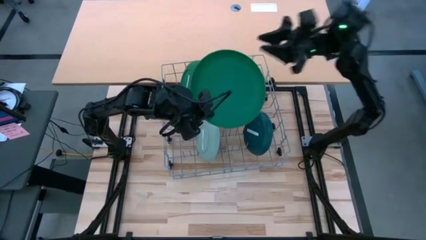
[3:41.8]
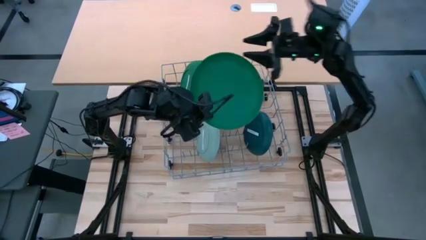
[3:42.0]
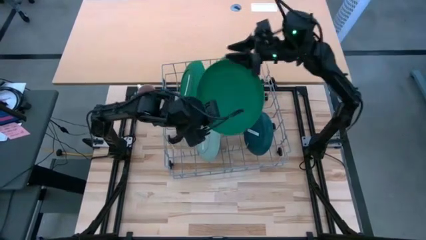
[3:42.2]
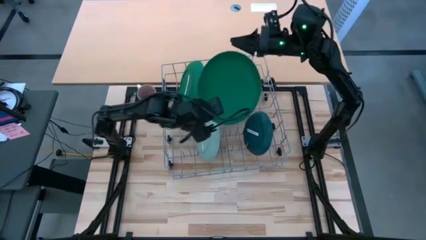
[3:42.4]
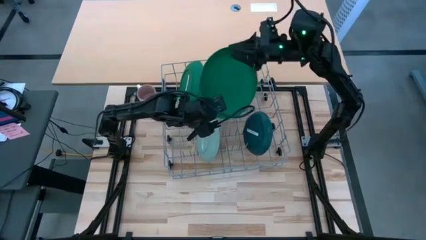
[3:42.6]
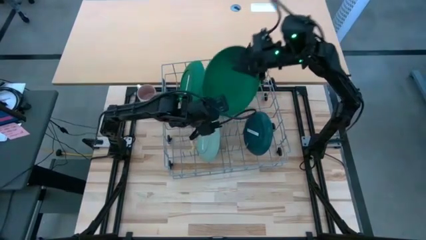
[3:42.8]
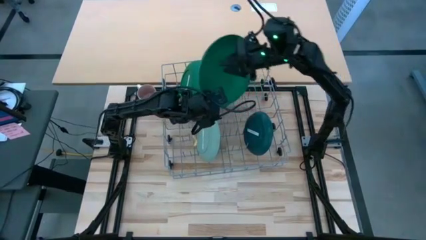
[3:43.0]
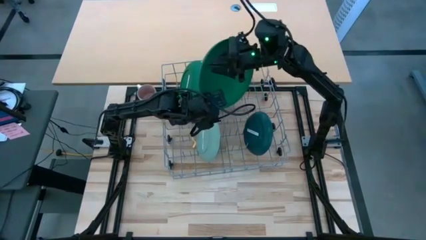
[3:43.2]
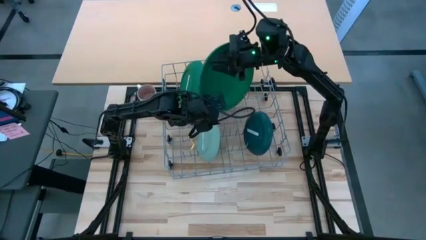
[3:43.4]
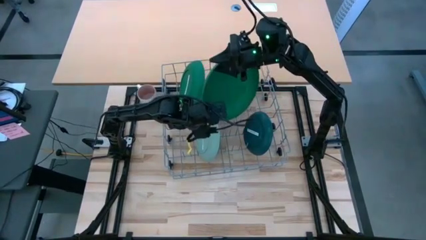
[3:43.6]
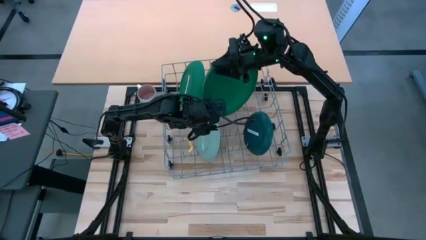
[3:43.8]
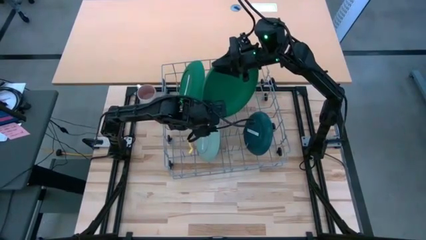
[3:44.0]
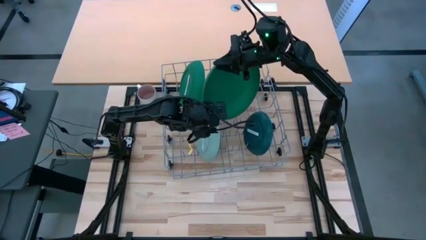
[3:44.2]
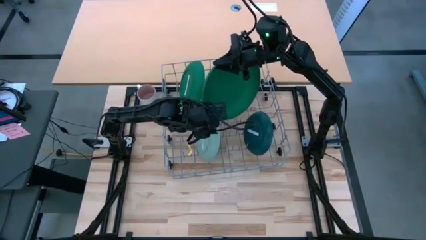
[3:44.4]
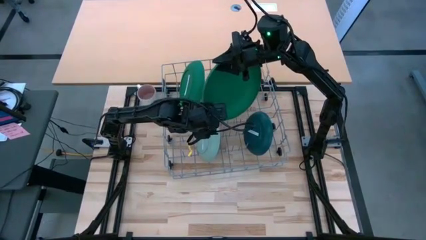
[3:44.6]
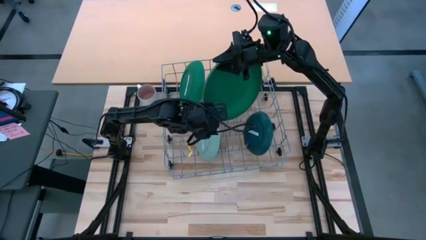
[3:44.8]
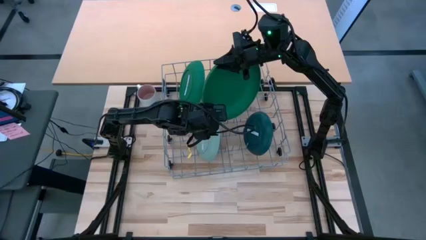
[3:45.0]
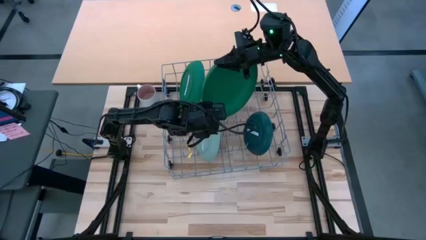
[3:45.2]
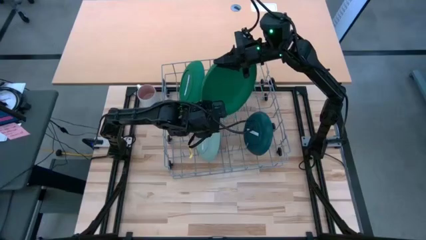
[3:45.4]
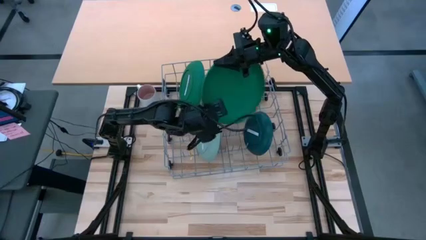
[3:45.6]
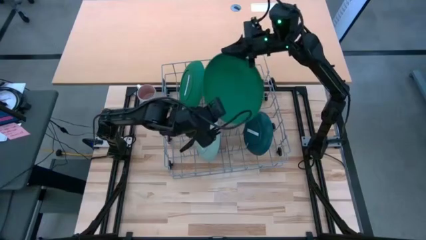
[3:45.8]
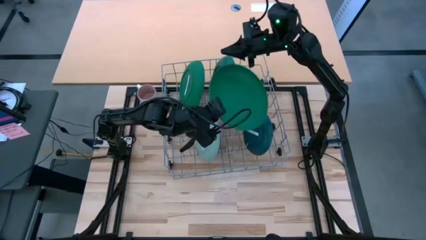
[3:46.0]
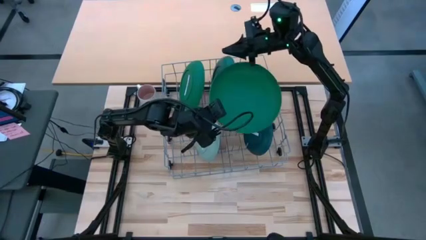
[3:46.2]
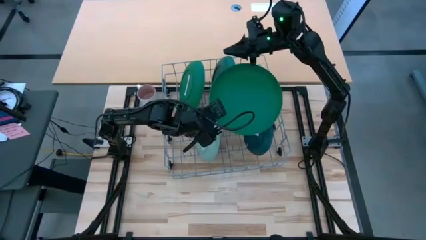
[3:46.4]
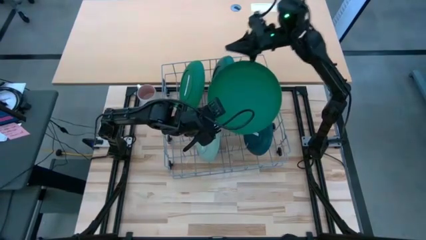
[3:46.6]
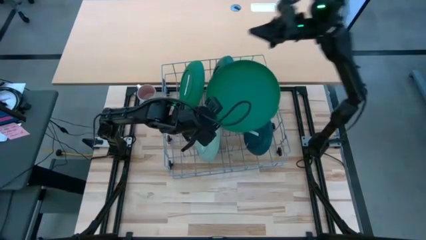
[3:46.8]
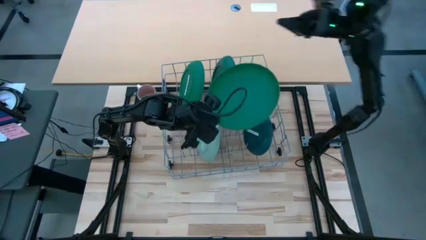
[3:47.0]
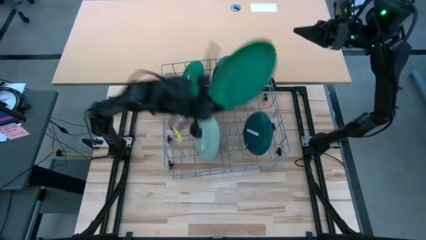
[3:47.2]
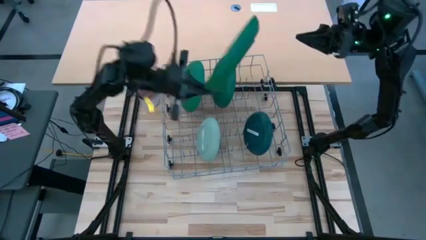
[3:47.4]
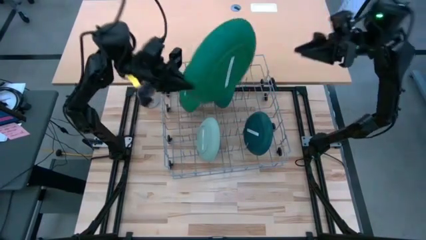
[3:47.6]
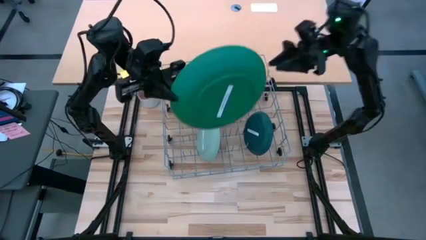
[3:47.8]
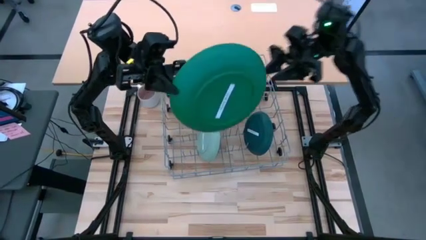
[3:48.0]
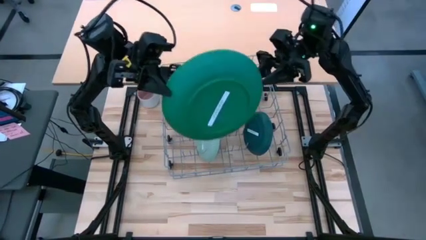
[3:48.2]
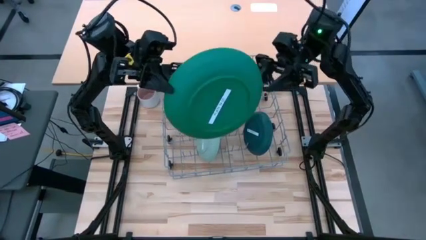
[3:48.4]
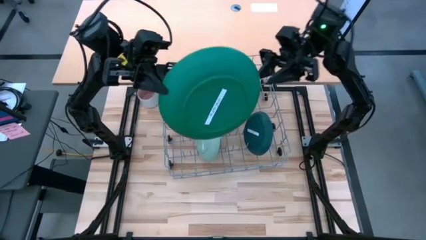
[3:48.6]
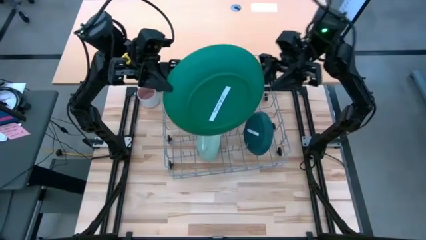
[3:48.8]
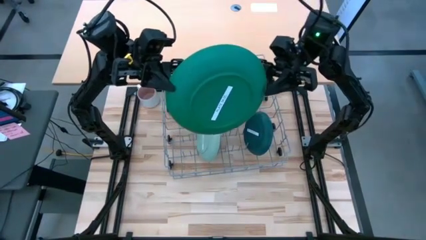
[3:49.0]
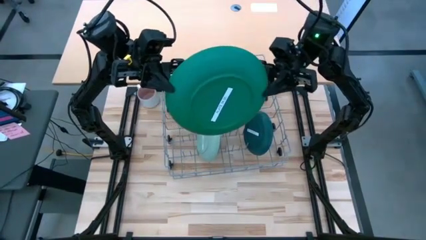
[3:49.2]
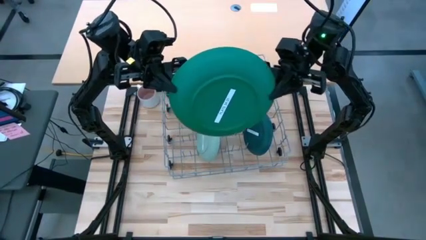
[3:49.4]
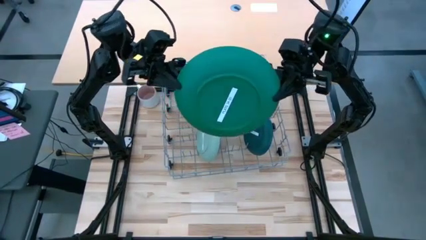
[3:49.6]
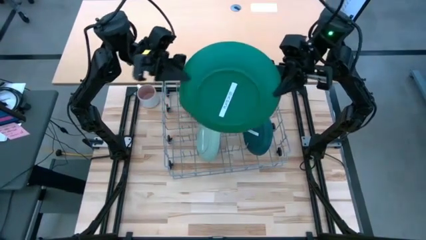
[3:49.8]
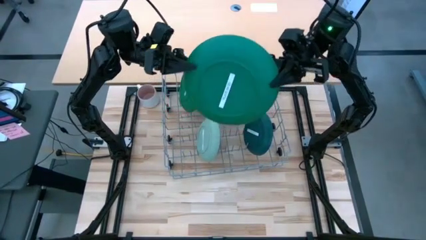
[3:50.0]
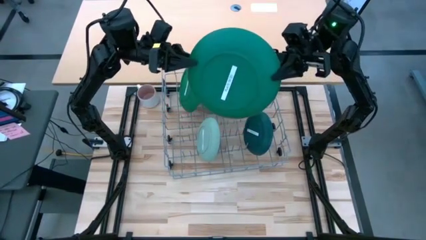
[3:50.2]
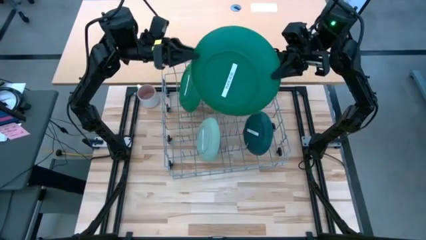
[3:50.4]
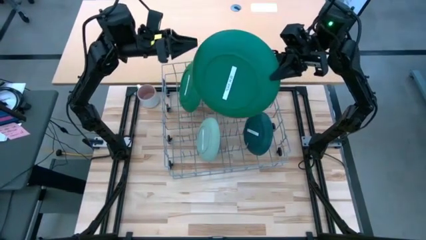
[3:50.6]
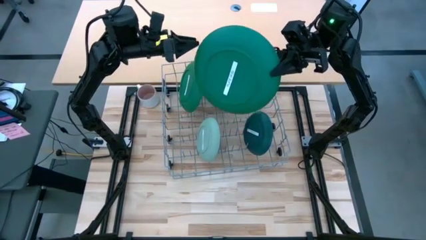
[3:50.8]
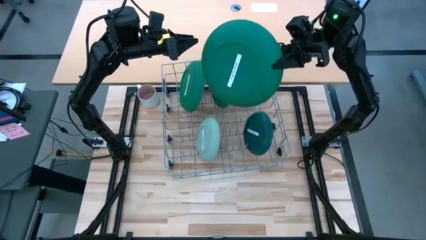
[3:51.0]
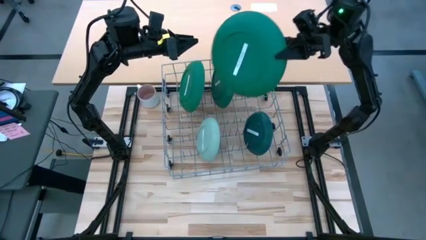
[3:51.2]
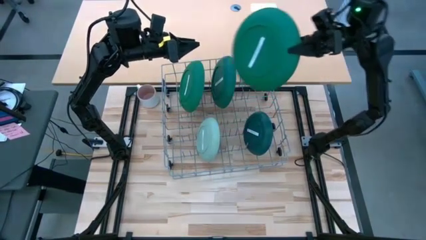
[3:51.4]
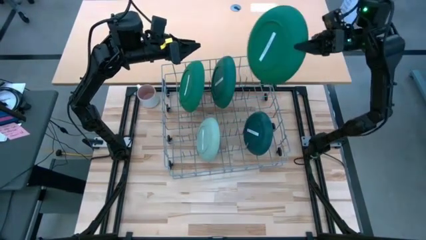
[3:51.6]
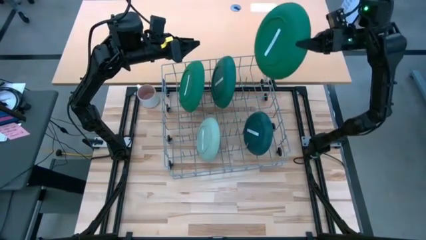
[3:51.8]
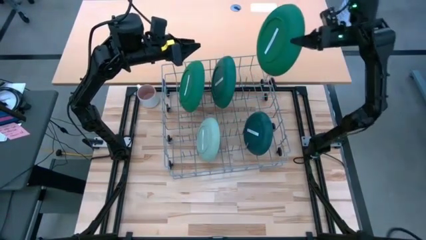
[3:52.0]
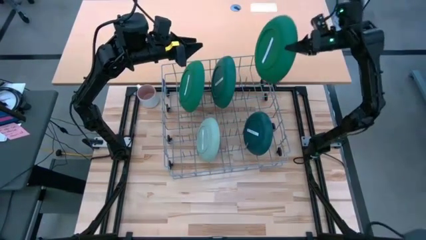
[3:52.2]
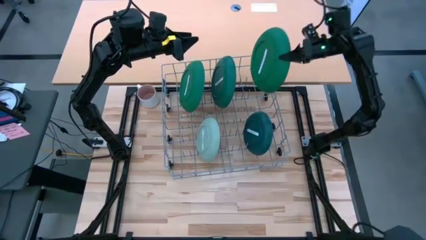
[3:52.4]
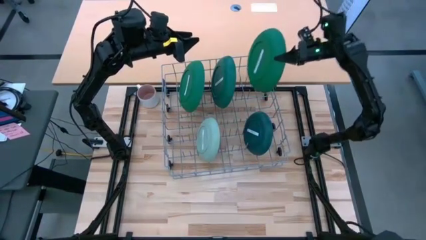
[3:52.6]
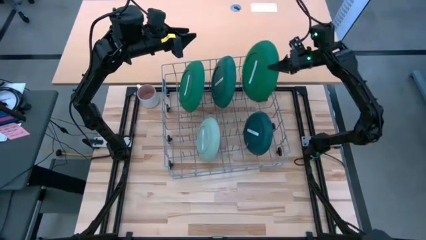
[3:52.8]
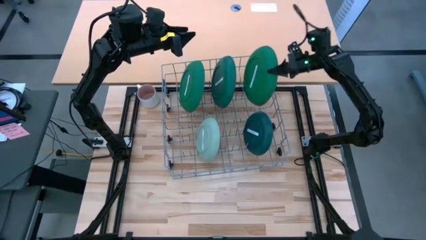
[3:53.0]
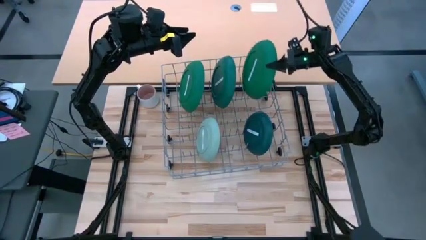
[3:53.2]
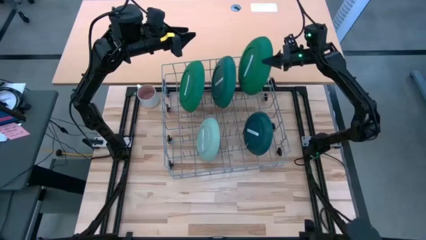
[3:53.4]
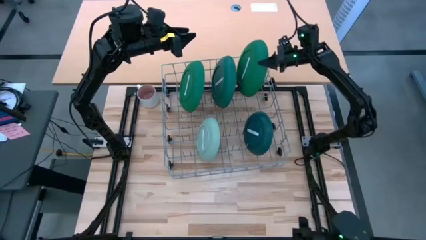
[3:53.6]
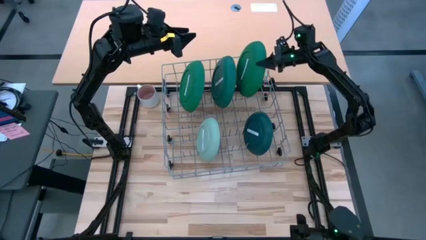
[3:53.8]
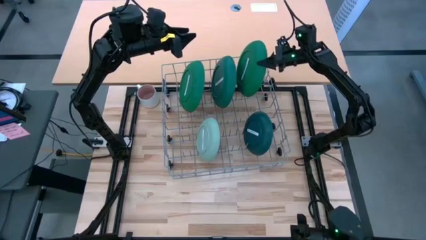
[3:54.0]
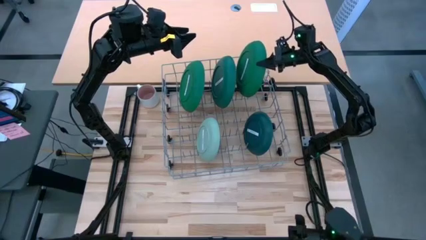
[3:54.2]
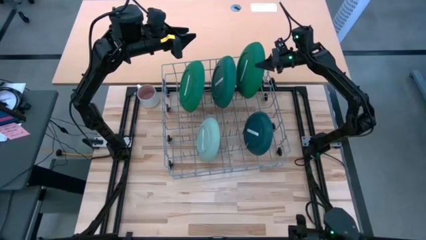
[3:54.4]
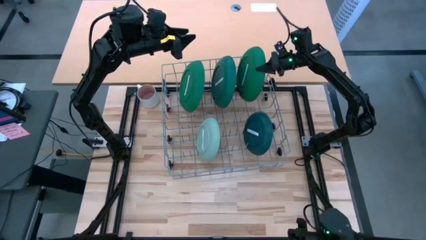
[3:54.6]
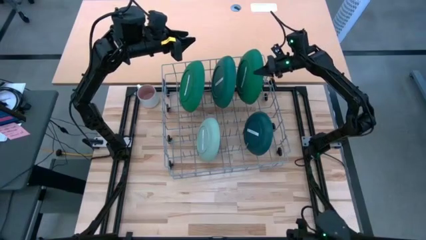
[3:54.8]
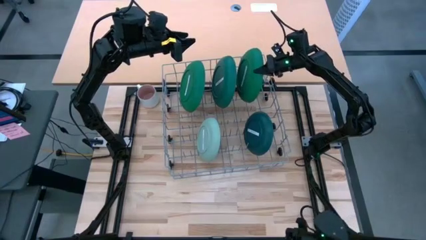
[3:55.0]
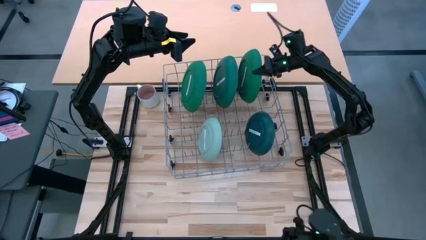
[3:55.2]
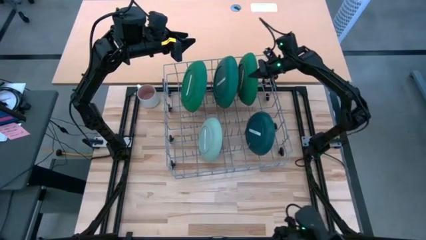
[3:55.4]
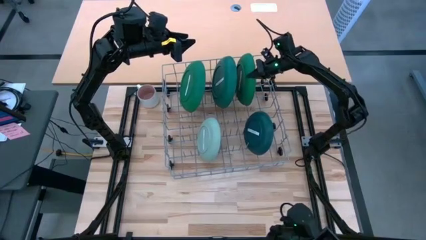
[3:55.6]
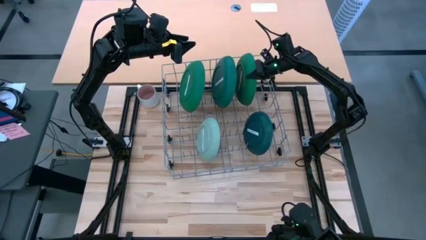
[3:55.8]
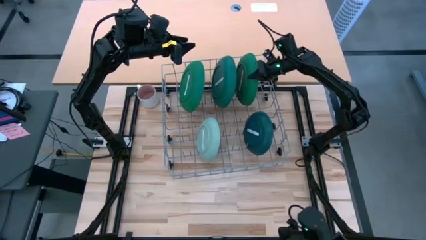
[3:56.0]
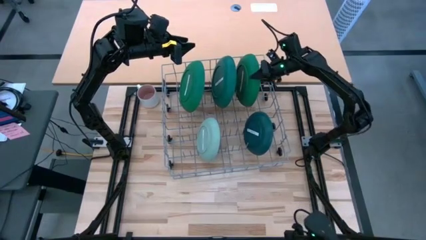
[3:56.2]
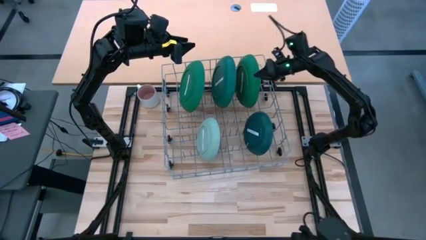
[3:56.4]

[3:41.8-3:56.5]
Task: Sort dishes
Put the green plate in the dish rack
